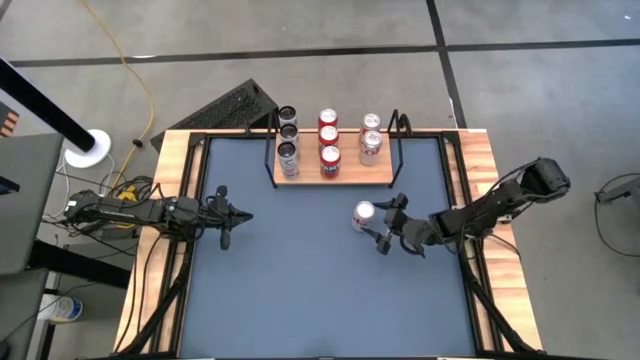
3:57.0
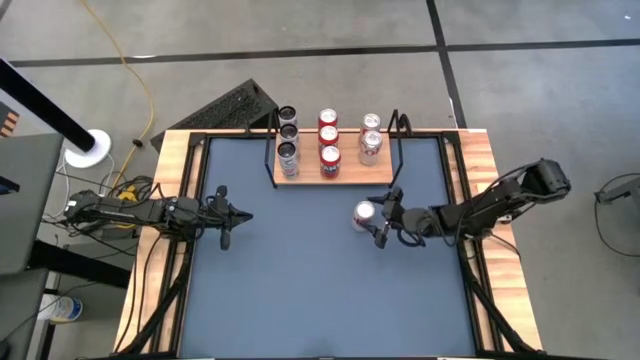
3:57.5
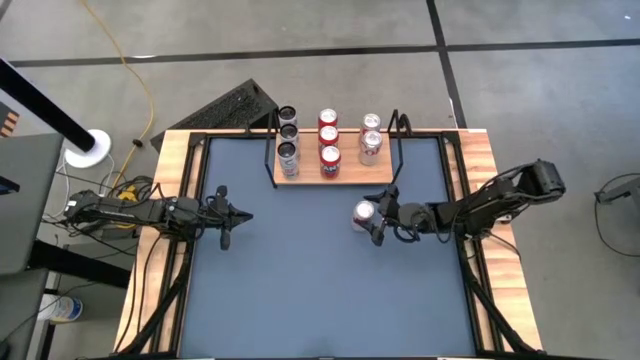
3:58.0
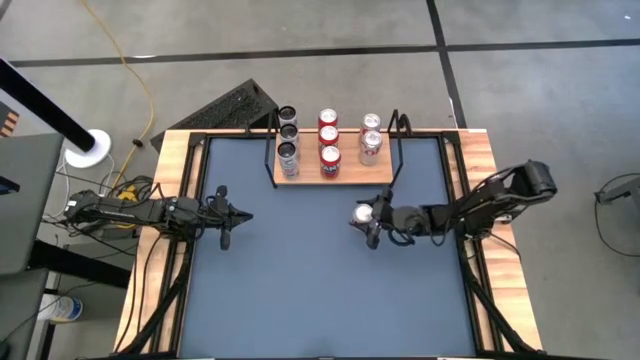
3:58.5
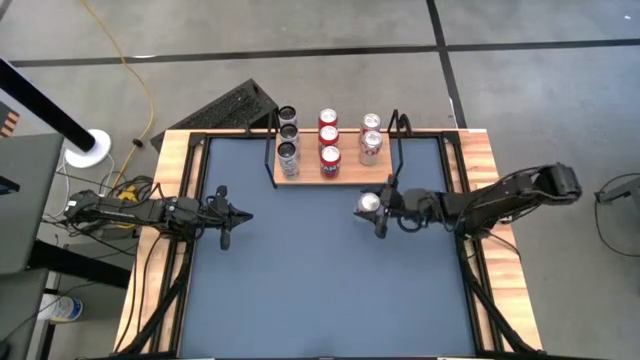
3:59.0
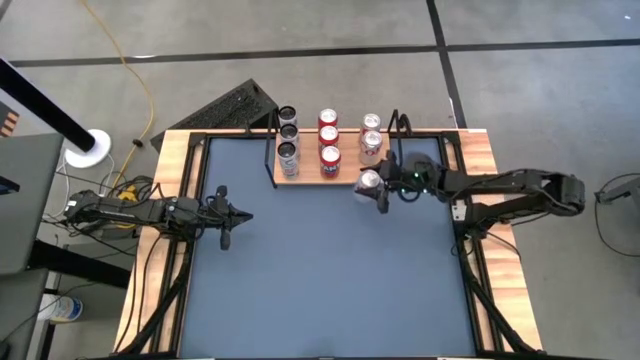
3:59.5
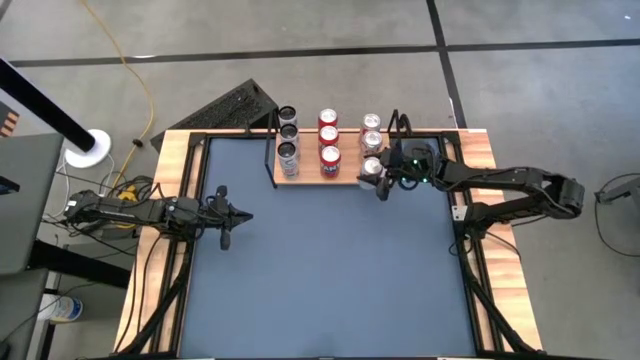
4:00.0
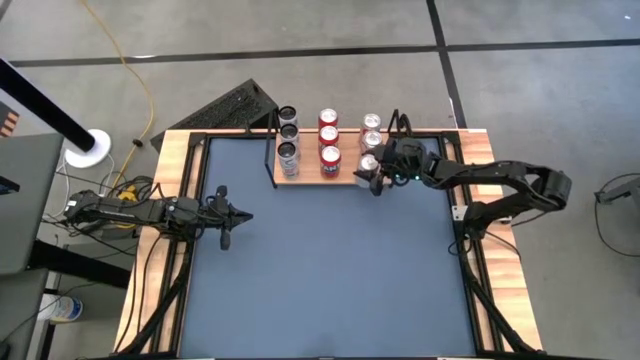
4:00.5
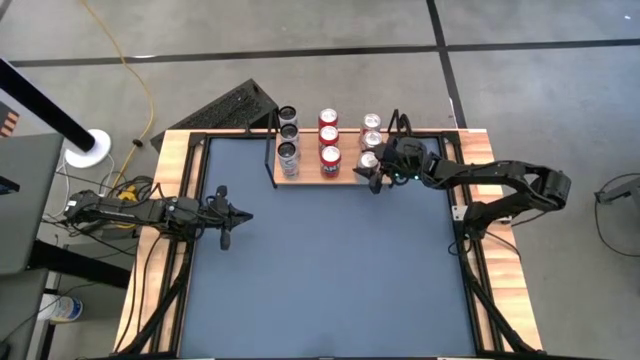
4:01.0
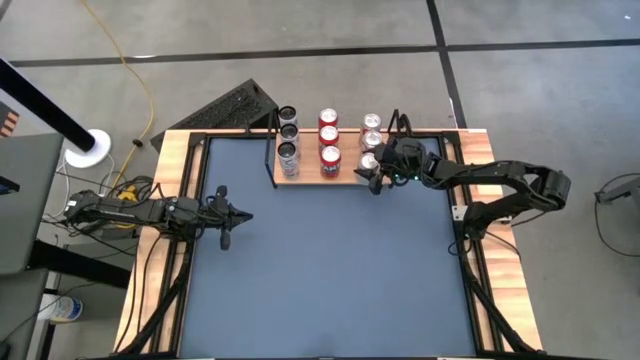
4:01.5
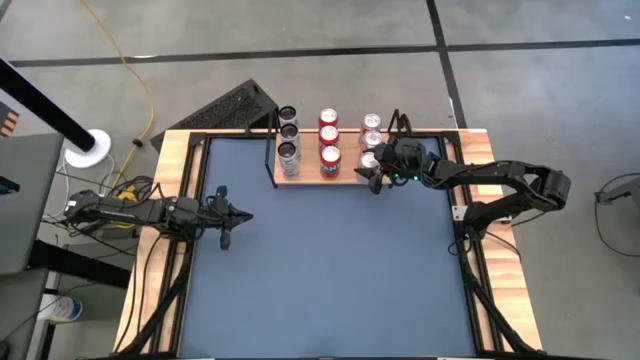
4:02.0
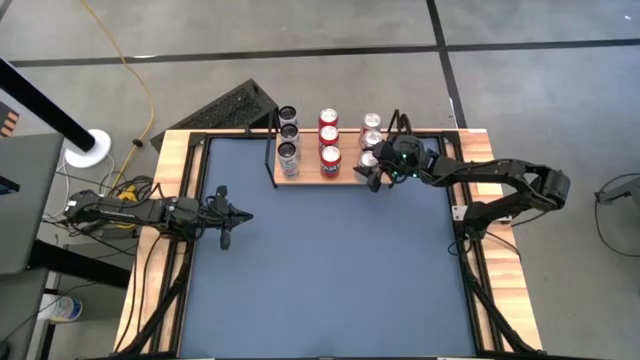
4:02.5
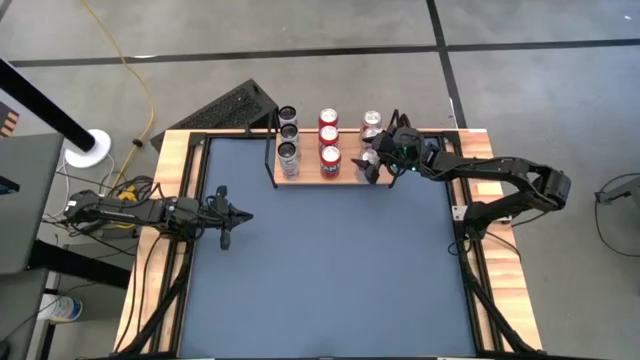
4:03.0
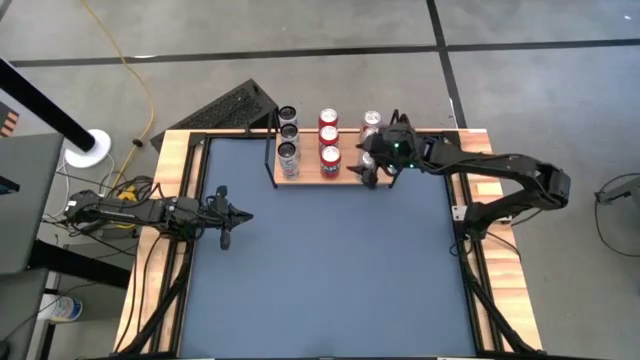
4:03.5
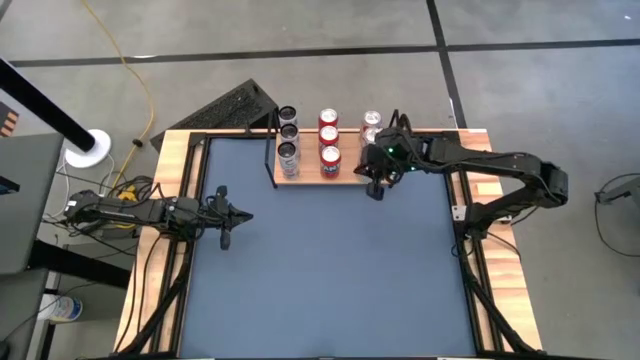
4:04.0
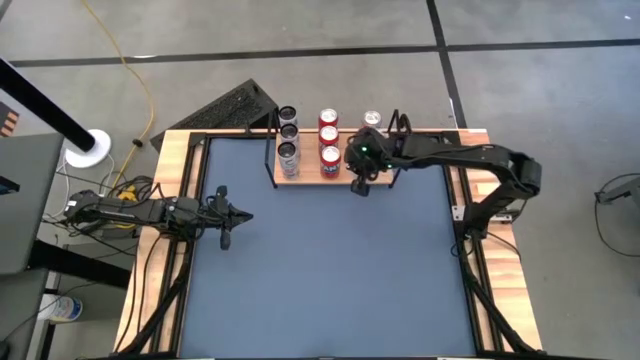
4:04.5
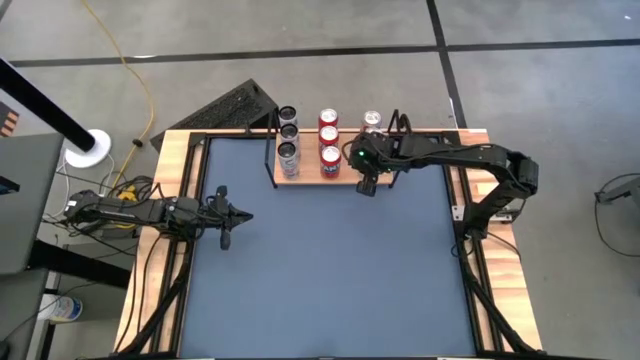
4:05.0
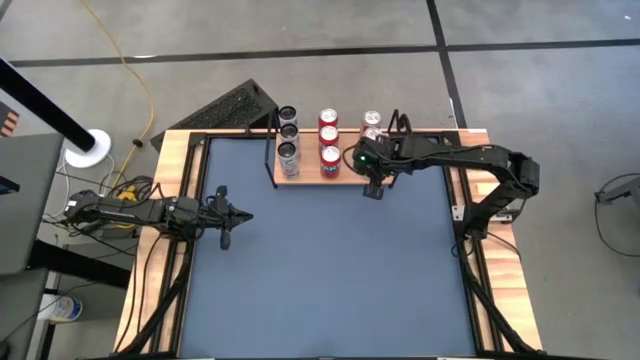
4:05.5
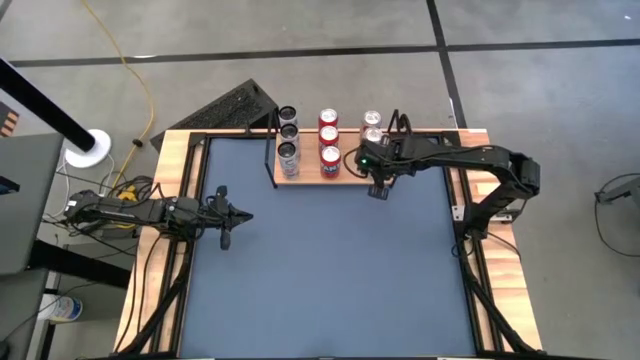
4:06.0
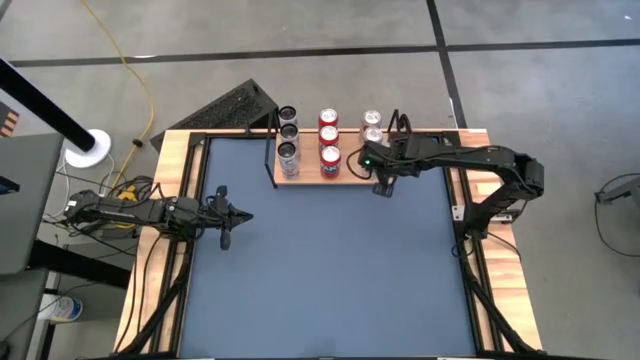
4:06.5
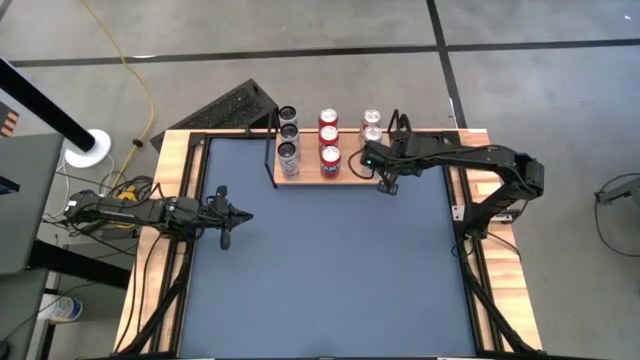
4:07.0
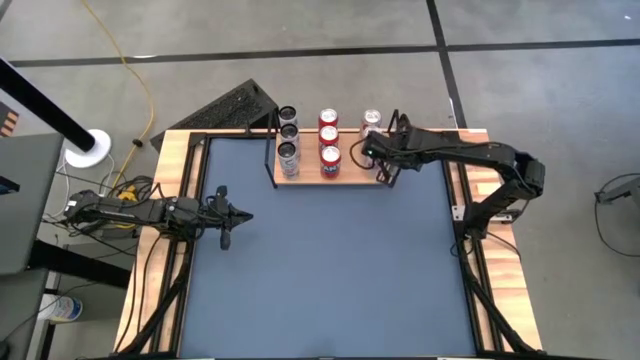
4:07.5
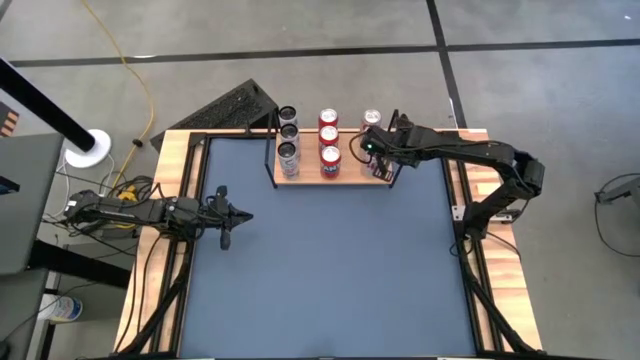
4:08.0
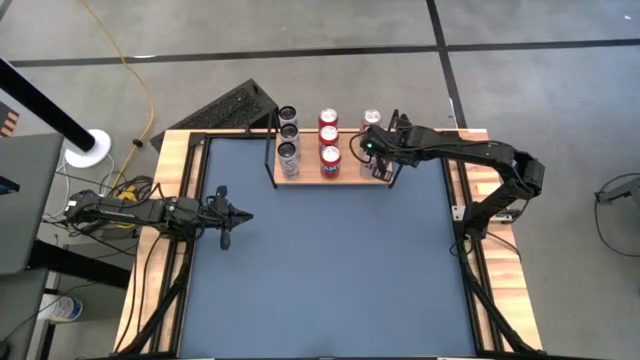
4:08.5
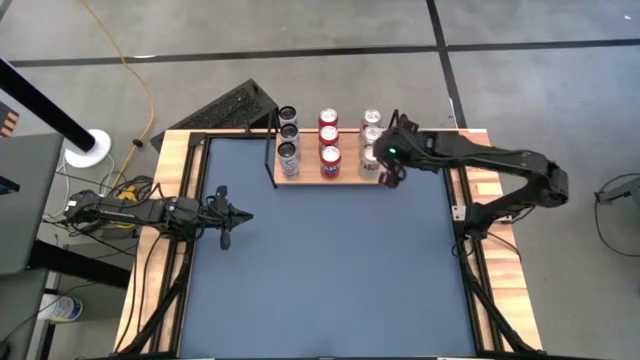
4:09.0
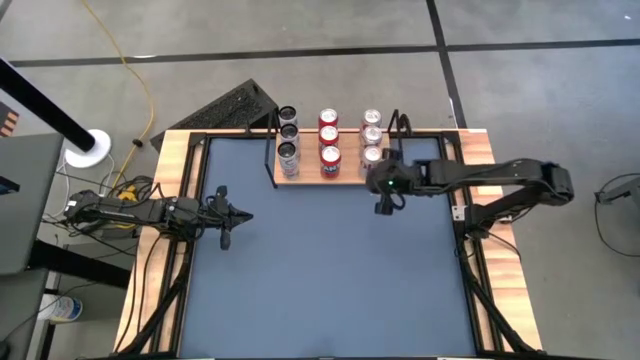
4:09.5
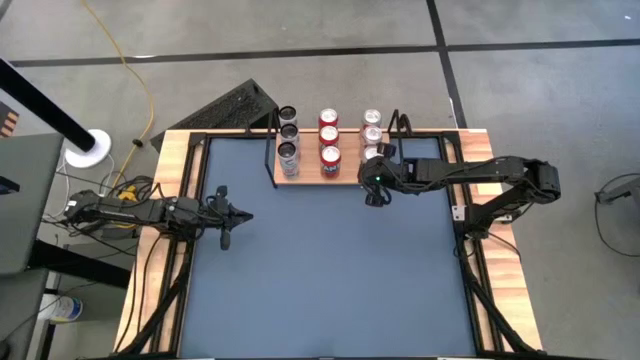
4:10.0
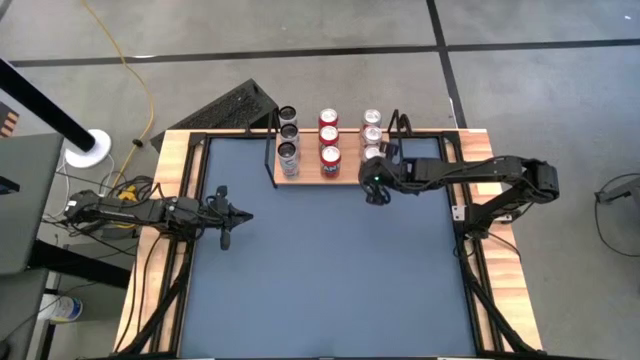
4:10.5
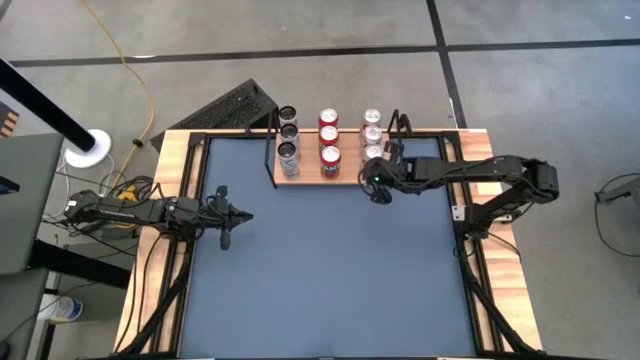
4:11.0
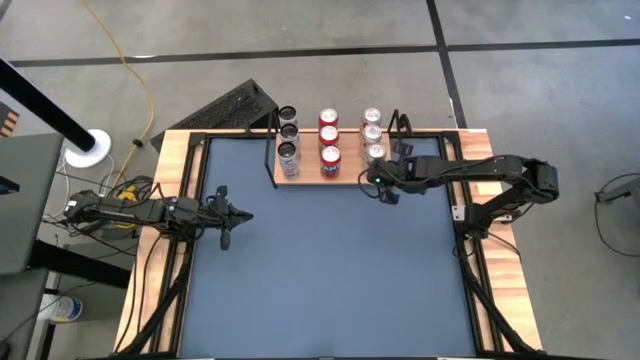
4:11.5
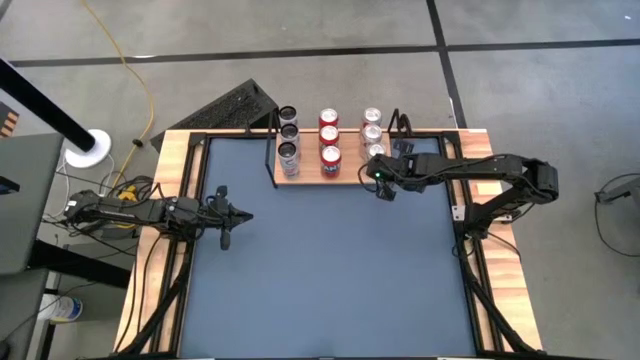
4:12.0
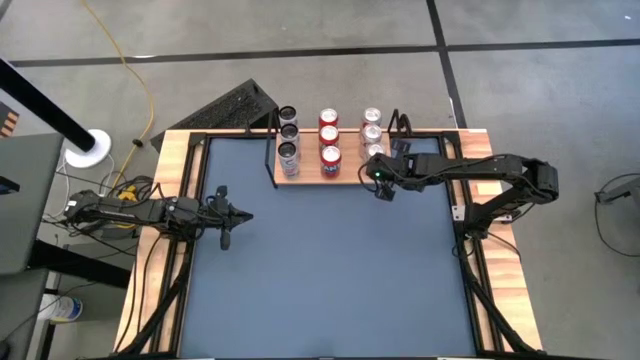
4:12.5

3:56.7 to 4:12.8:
Task: Place canned beverage on shelf
Put the red-silver soda can on the shelf aligned with the other red-silver soda cans

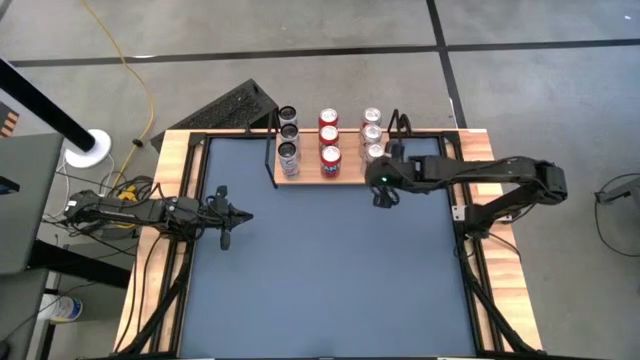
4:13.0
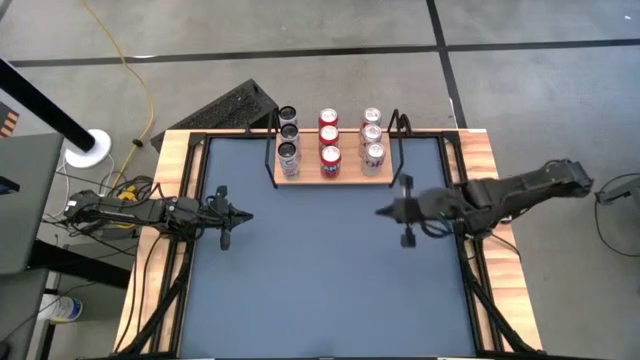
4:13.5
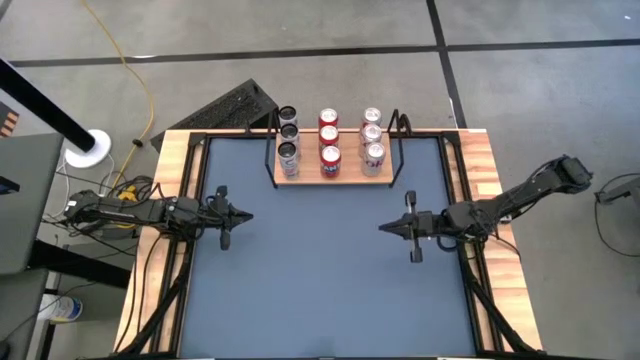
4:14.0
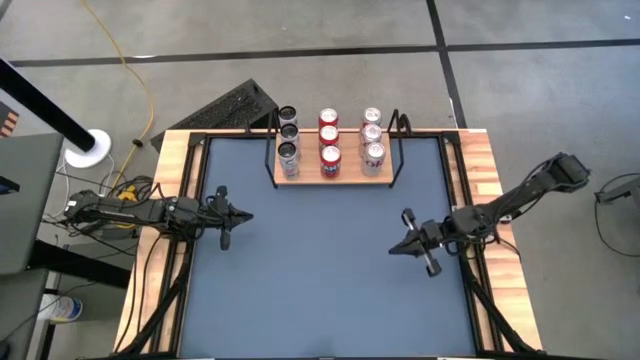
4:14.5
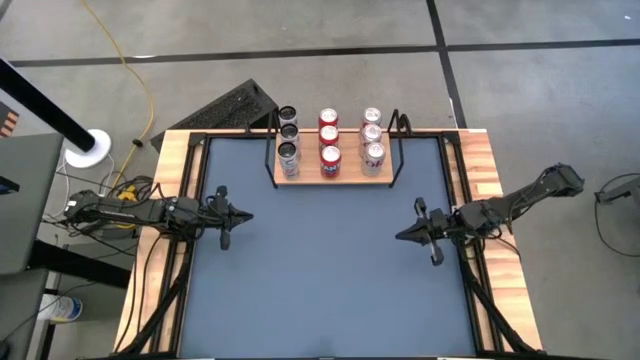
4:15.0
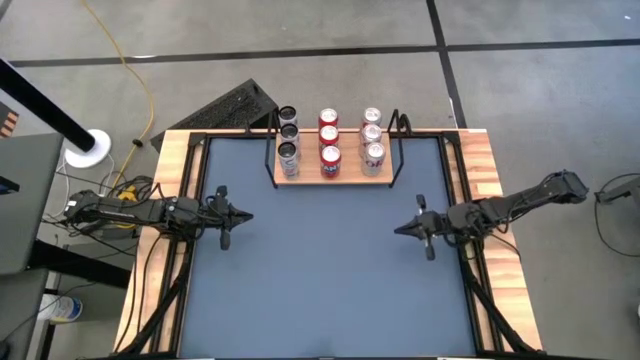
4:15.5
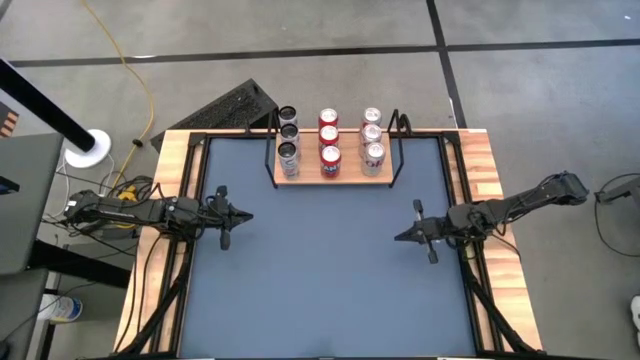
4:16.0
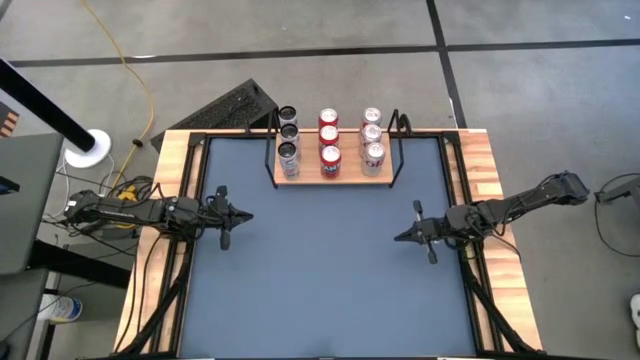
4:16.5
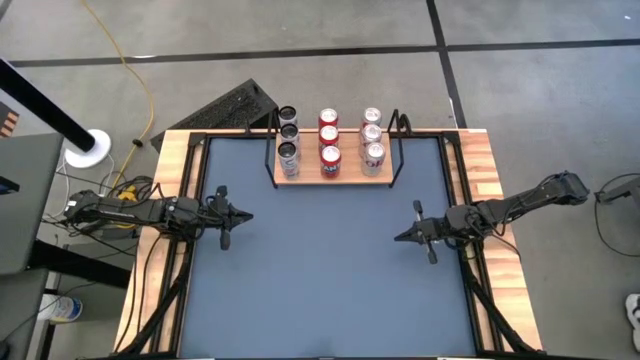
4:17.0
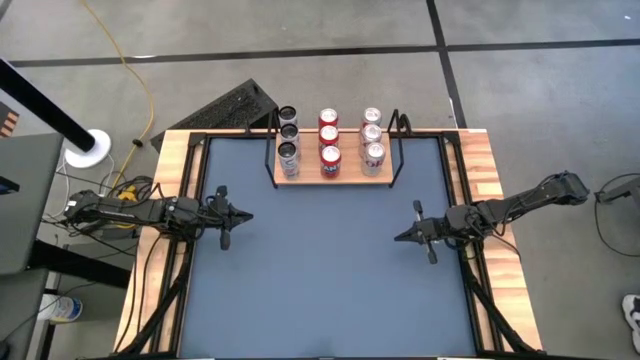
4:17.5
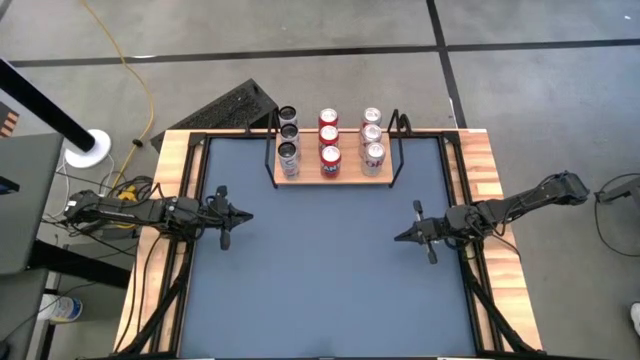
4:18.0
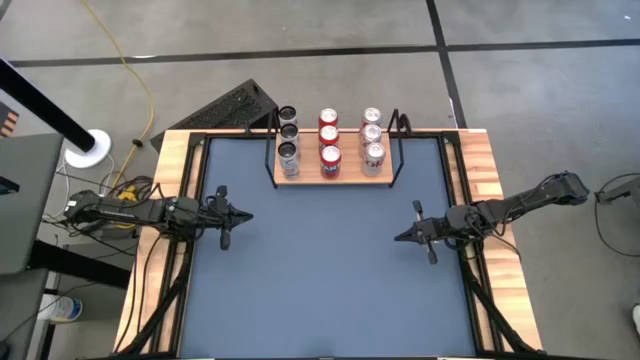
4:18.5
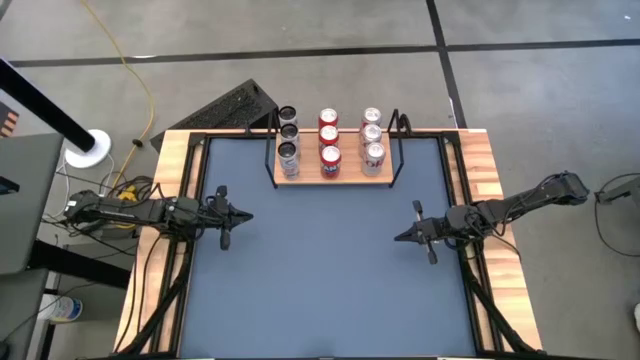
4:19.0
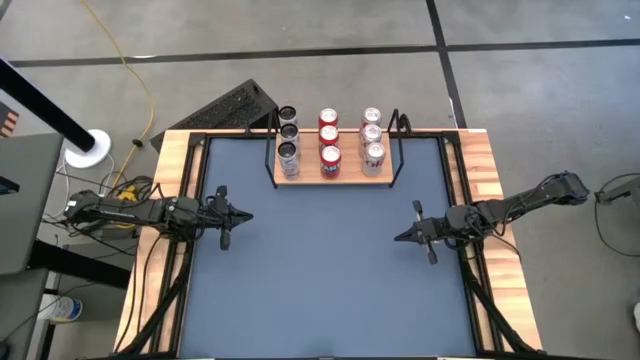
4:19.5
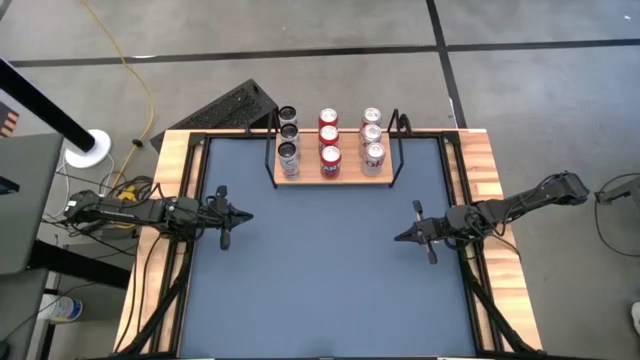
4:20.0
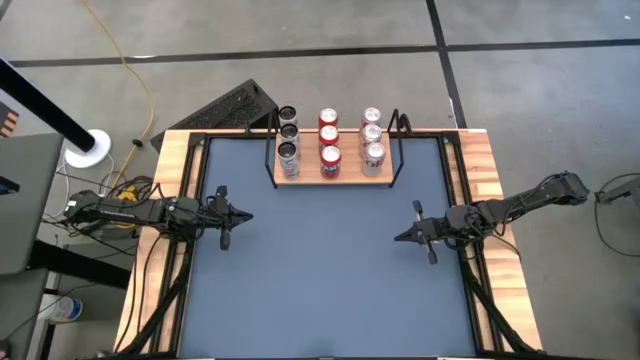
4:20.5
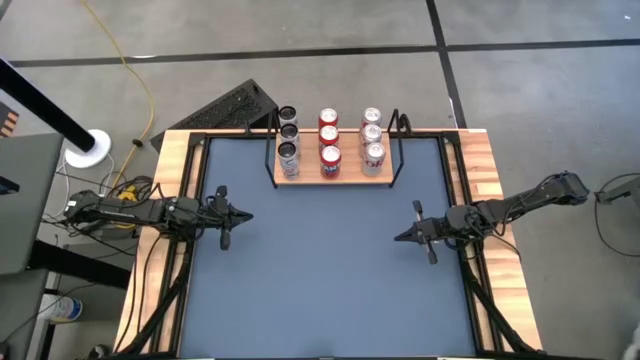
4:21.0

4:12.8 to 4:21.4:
Return to Home Position
